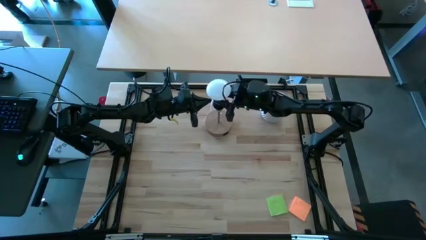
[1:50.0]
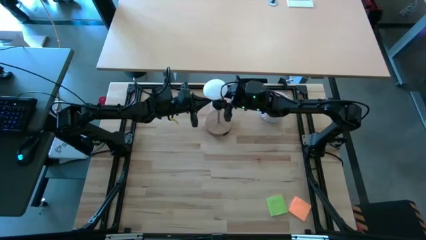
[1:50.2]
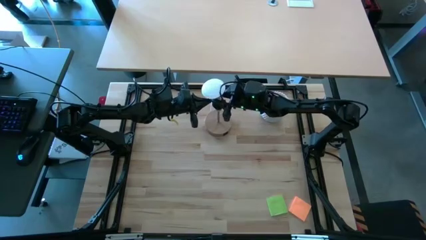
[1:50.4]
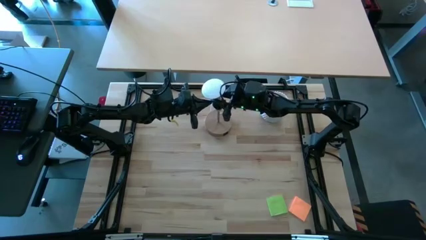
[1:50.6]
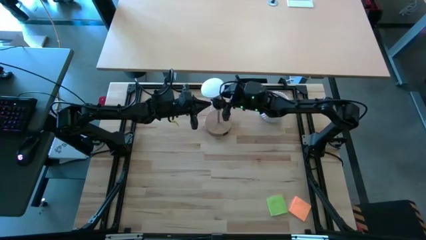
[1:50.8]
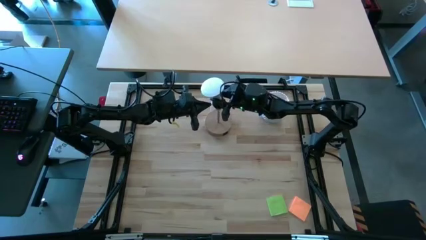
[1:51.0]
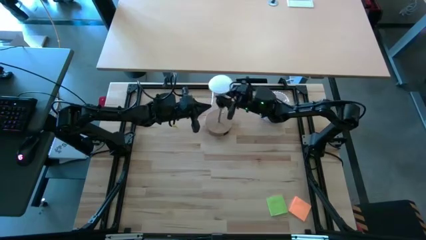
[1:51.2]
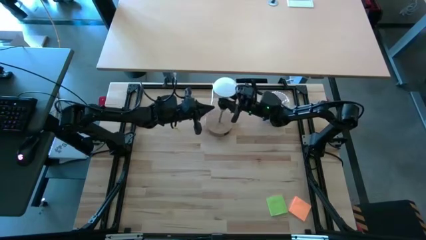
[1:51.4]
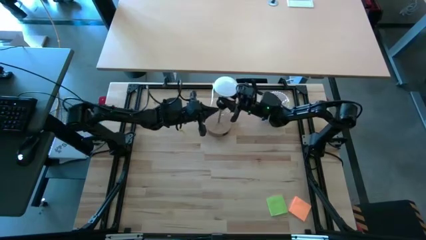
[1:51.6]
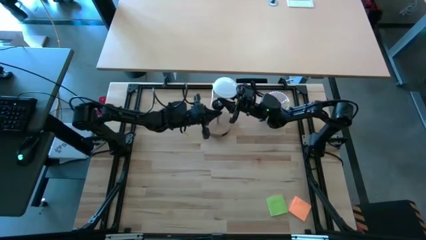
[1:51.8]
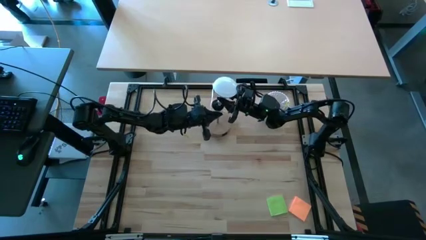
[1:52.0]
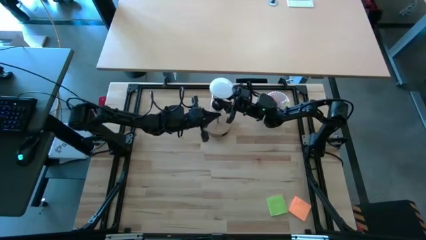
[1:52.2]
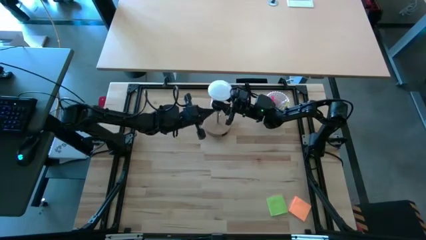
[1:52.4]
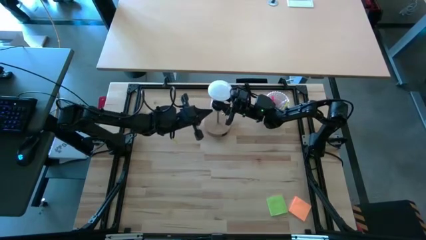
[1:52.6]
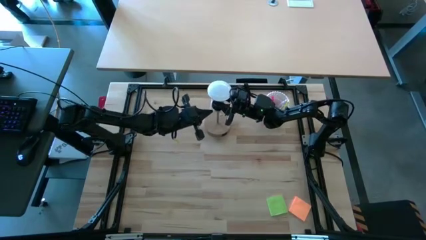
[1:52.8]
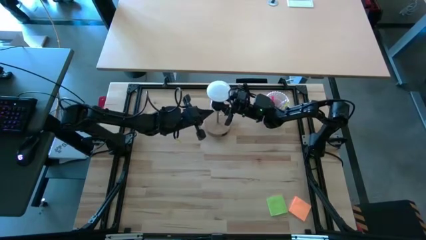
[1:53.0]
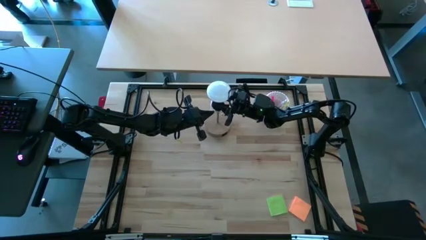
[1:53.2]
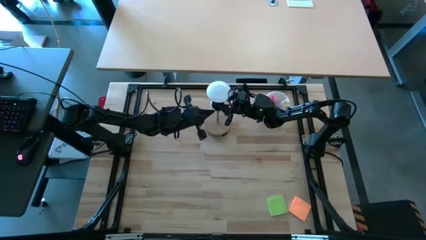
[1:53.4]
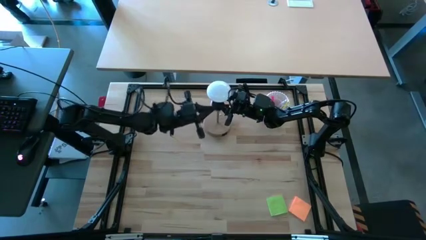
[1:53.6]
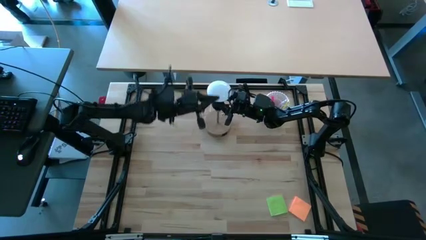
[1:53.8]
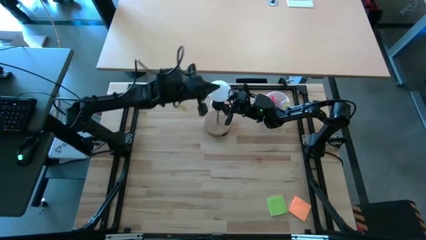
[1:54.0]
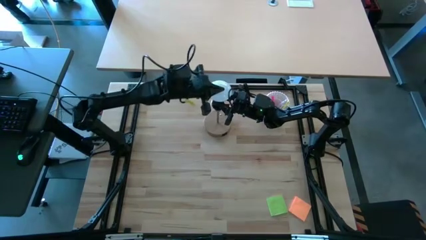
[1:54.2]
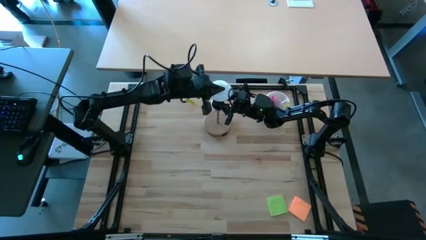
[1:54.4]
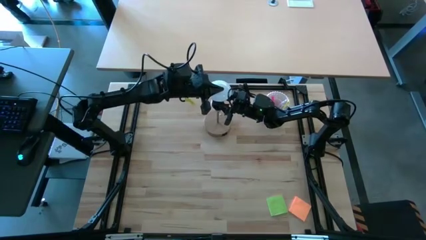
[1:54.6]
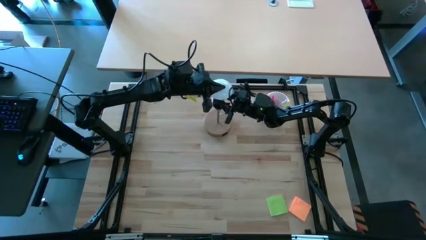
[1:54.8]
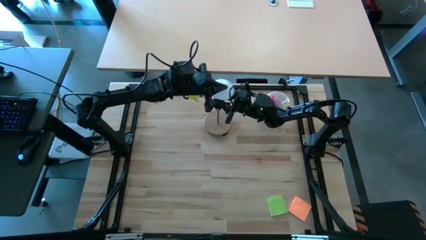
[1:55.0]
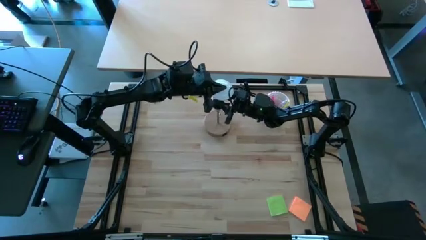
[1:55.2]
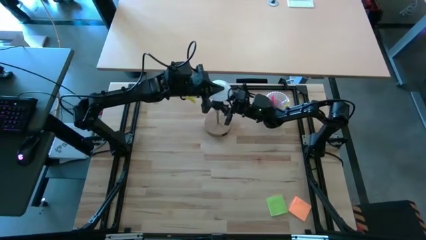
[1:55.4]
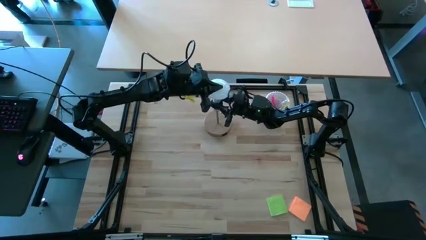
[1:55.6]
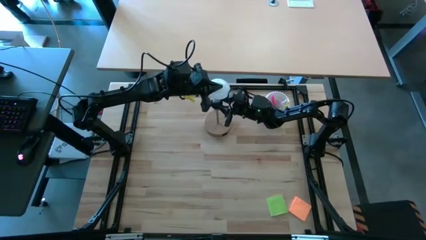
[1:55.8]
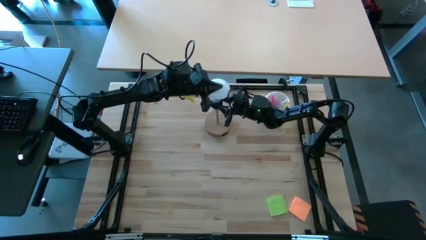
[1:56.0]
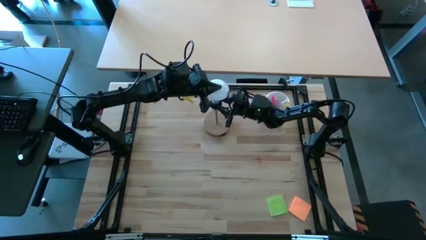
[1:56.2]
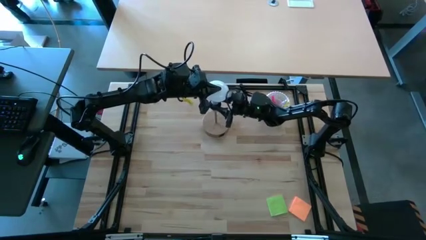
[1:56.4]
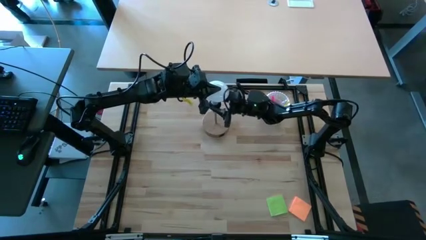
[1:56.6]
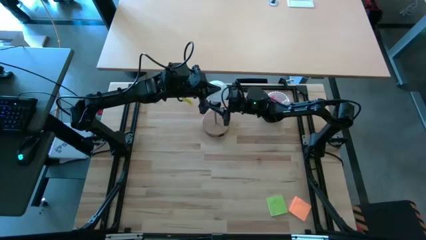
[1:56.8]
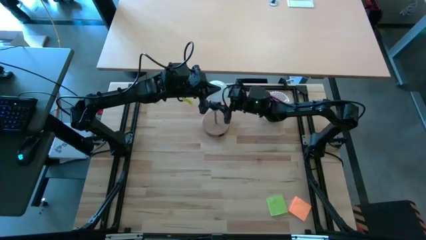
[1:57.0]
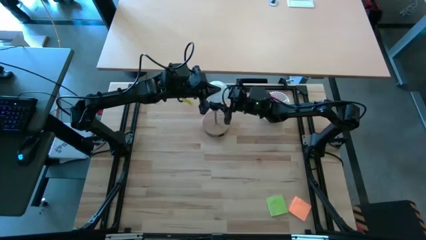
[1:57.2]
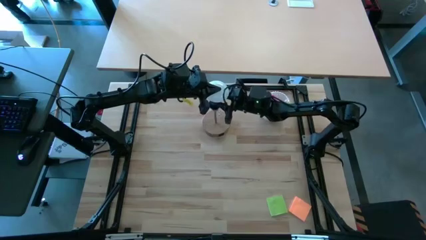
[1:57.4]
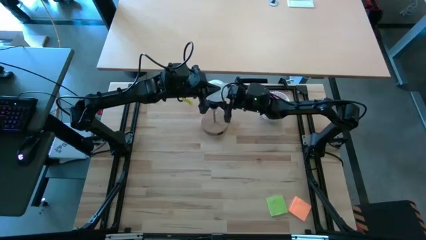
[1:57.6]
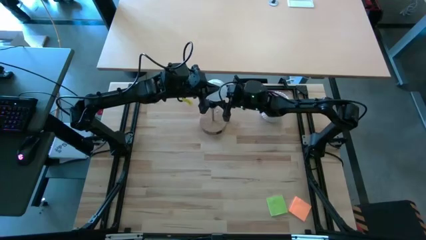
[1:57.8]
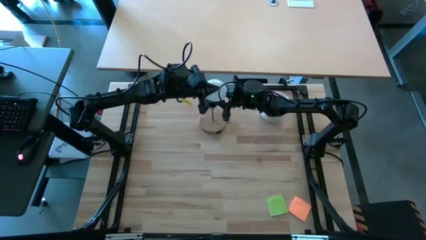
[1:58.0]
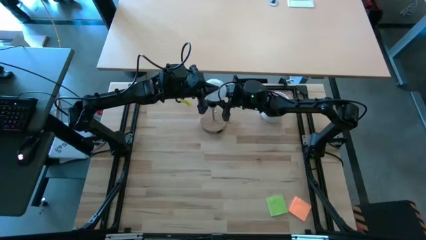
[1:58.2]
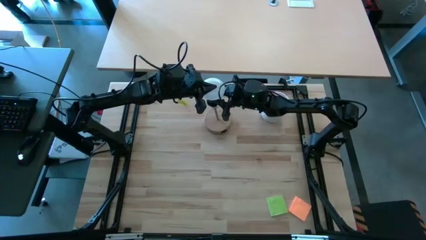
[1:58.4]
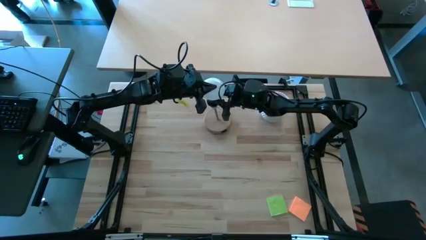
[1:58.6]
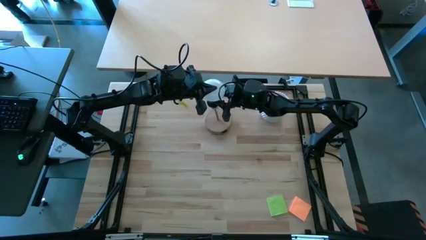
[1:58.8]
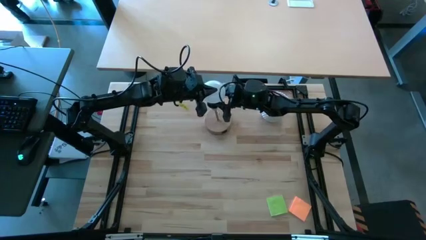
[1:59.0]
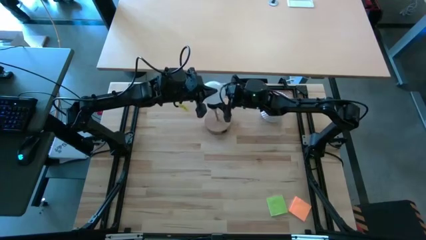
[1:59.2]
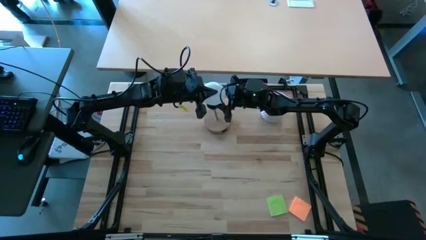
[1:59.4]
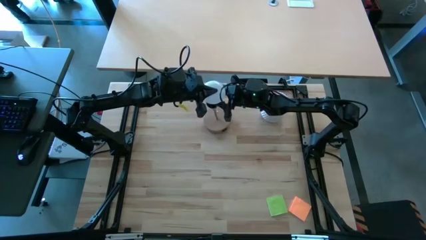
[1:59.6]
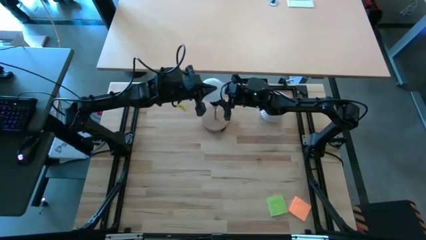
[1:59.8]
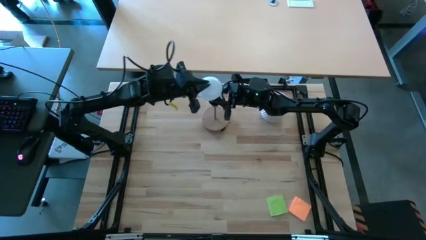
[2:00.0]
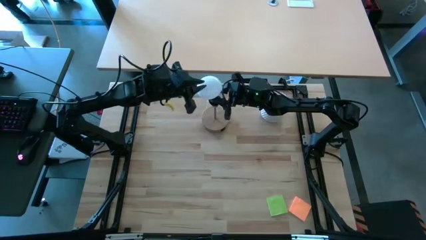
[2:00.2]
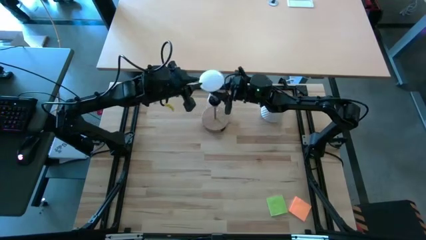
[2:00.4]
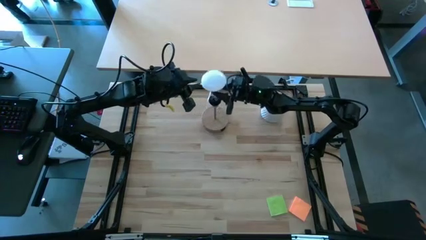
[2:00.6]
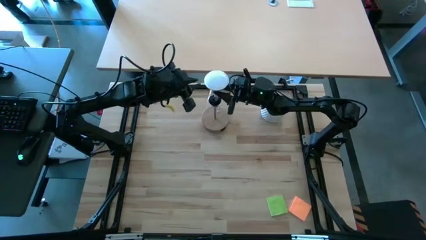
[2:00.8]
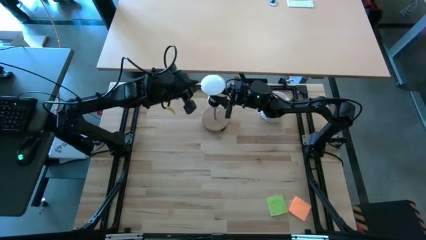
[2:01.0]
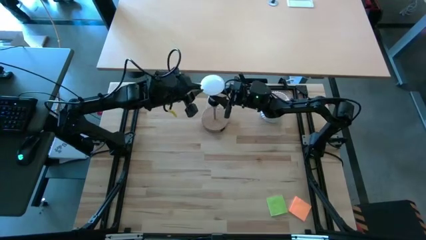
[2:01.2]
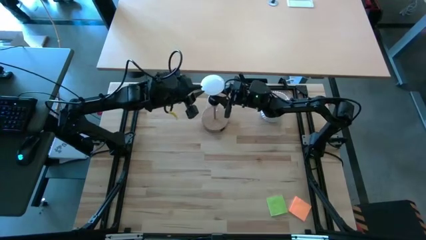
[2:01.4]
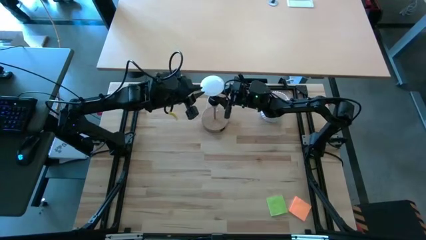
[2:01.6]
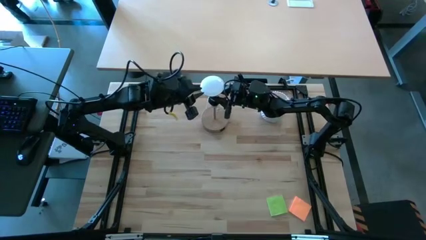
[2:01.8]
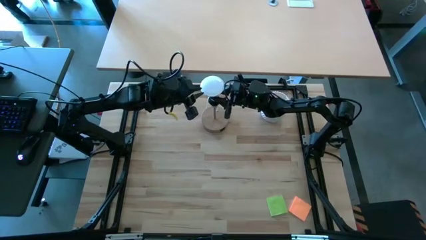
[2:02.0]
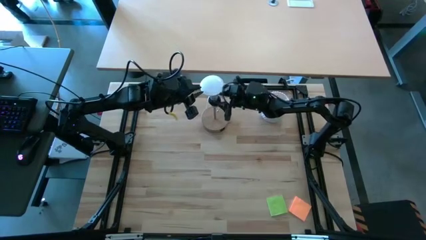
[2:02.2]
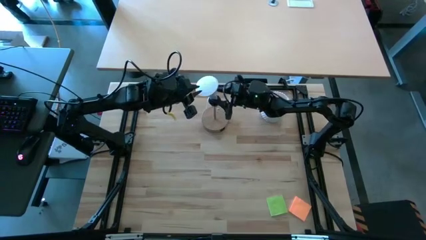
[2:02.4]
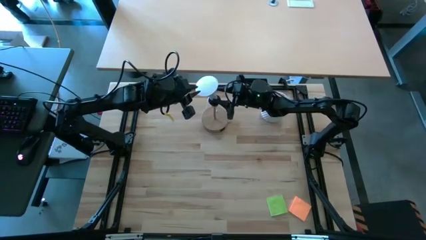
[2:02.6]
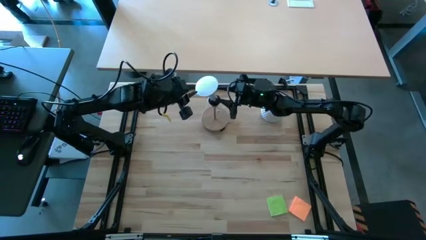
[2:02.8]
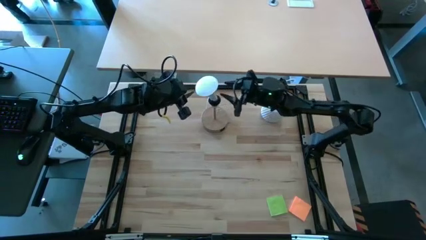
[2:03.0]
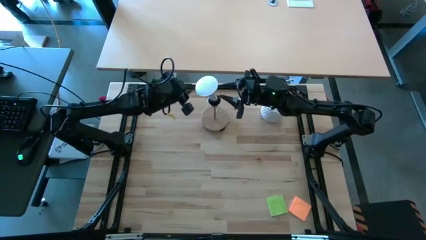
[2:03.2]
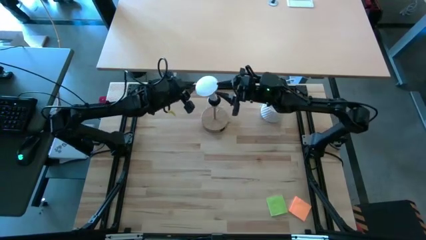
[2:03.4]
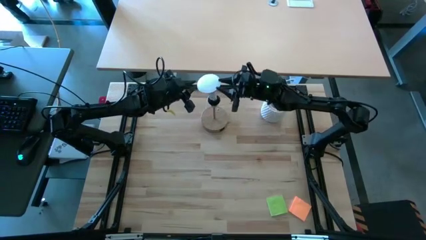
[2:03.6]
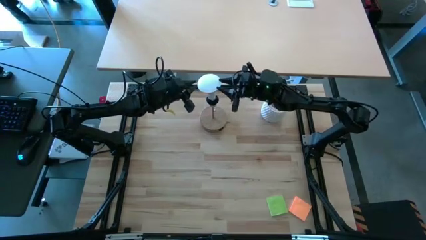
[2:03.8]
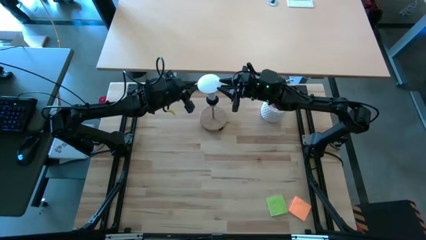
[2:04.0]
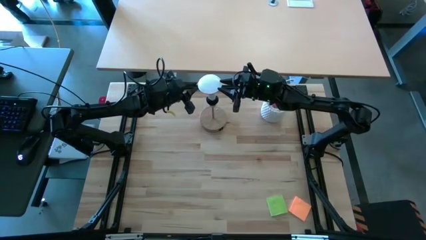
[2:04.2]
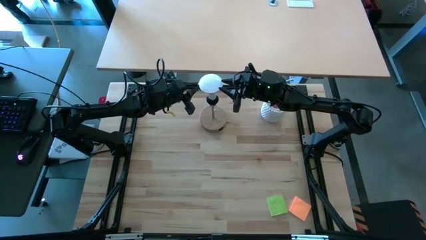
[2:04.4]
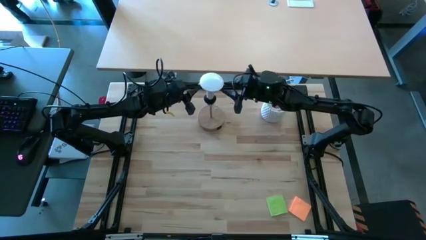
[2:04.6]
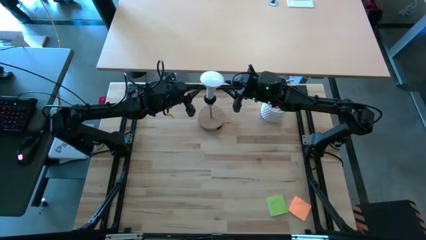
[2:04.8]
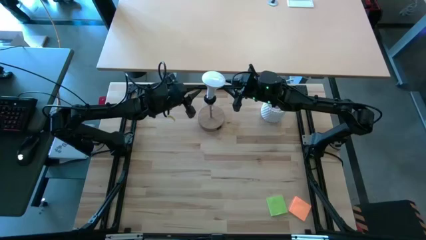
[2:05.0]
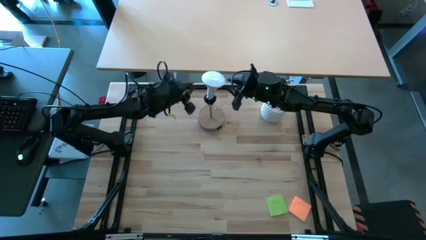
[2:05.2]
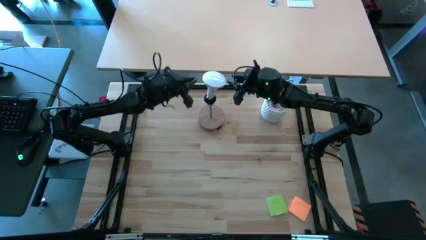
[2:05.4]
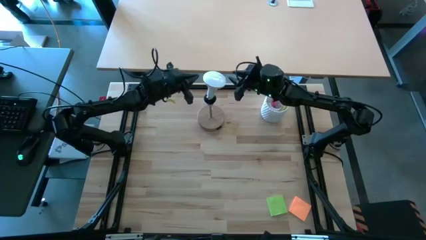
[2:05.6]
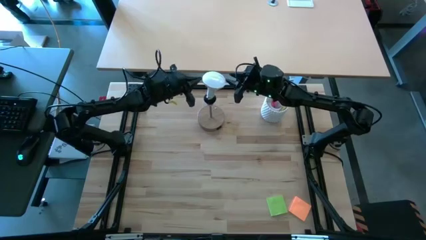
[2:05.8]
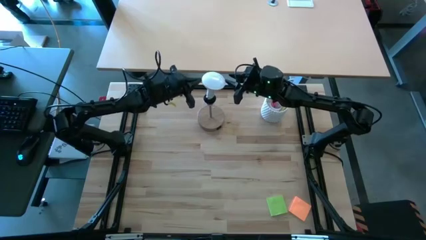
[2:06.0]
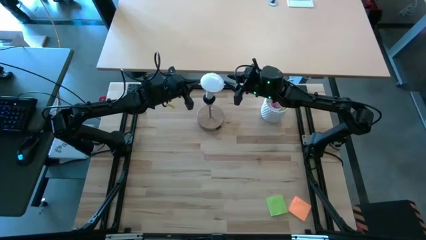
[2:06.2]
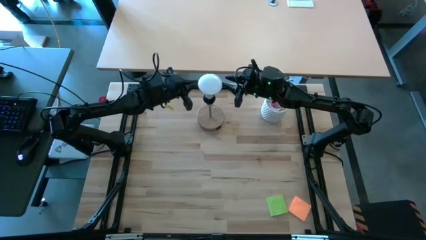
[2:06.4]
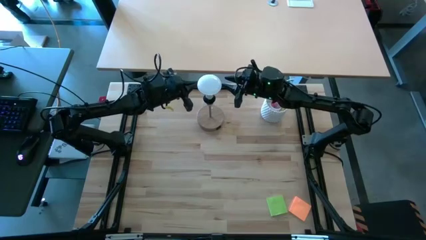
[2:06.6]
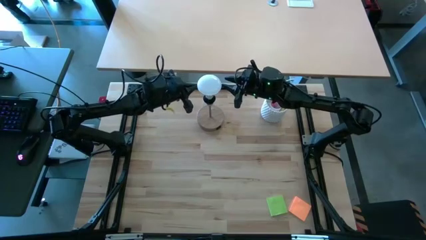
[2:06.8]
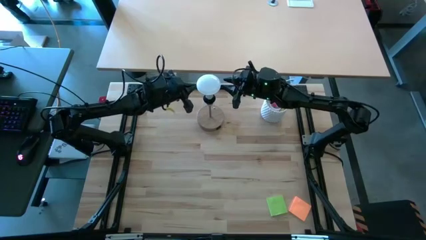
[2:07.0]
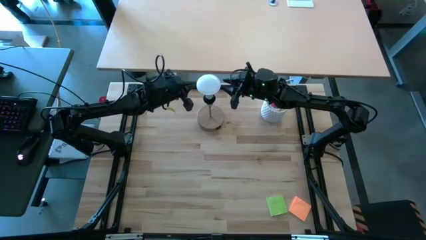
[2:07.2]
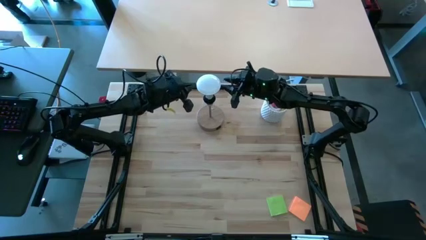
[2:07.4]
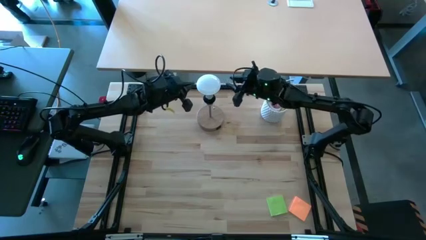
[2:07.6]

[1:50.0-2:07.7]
Task: Screw lightbulb
Insert the lightbulb into the lamp
